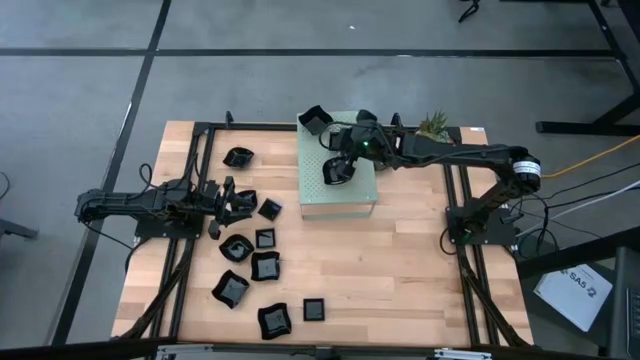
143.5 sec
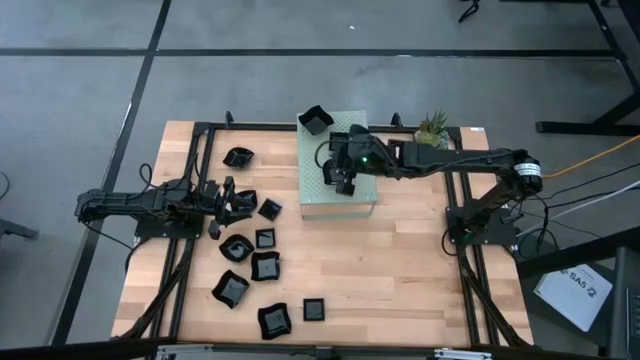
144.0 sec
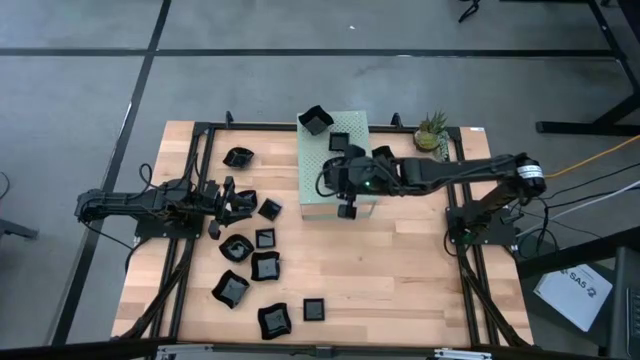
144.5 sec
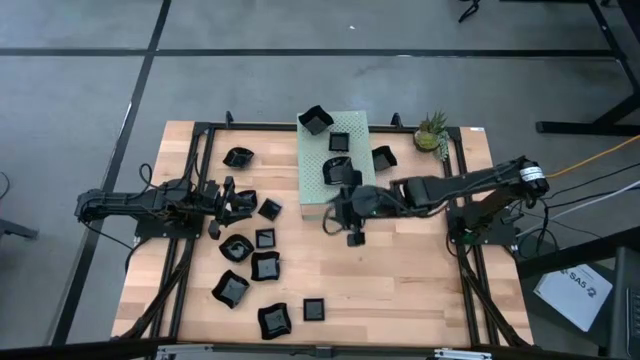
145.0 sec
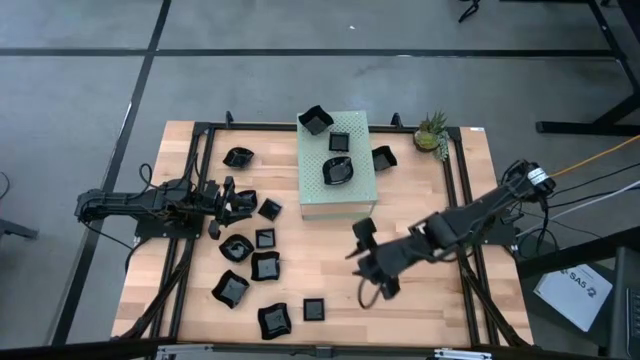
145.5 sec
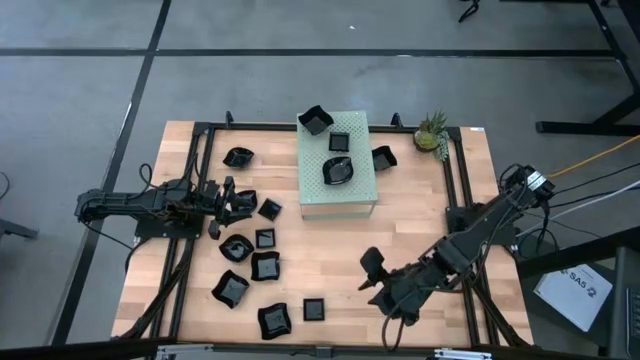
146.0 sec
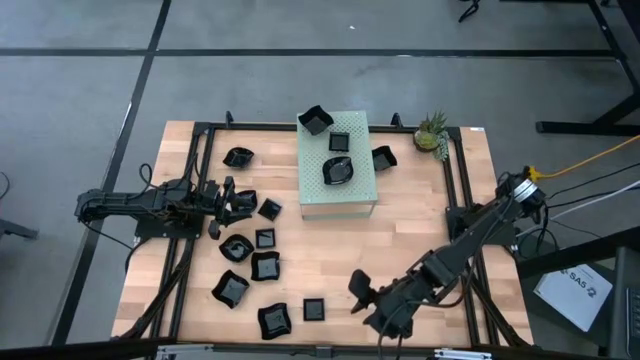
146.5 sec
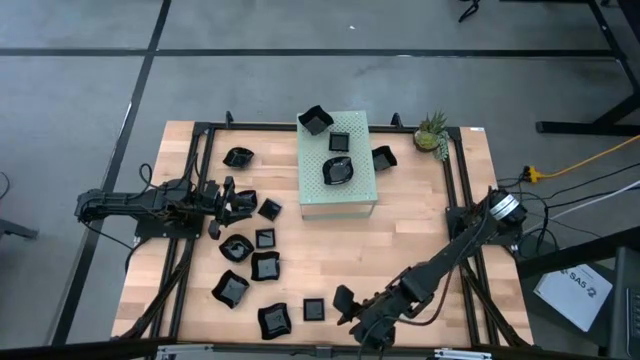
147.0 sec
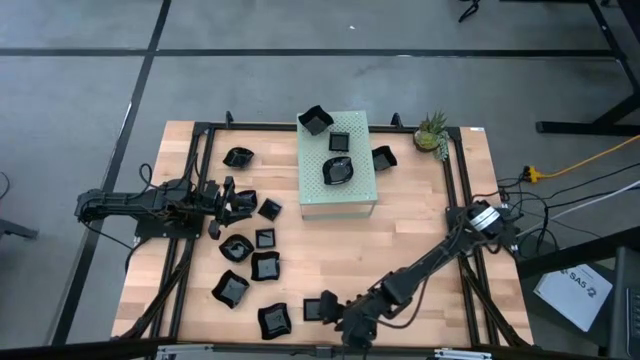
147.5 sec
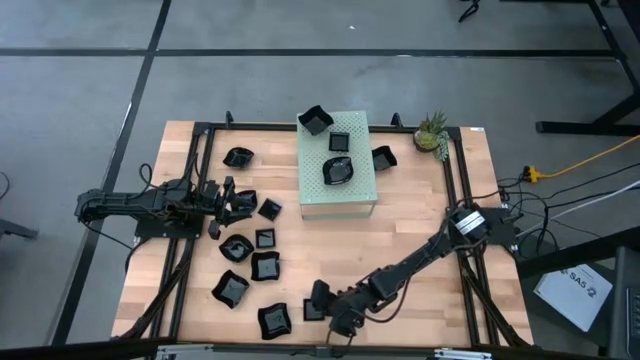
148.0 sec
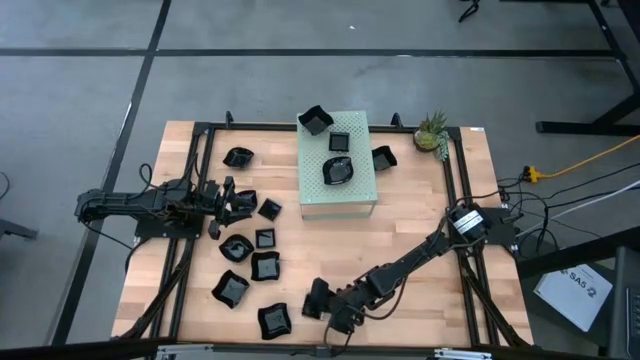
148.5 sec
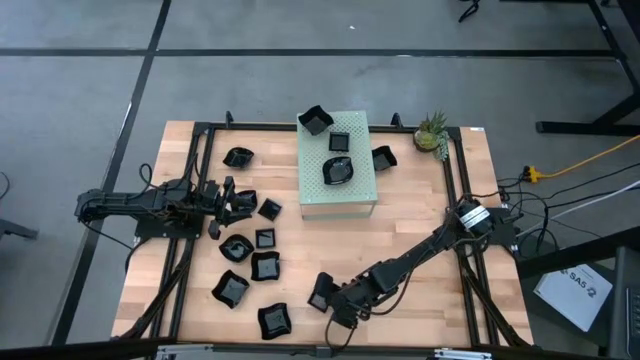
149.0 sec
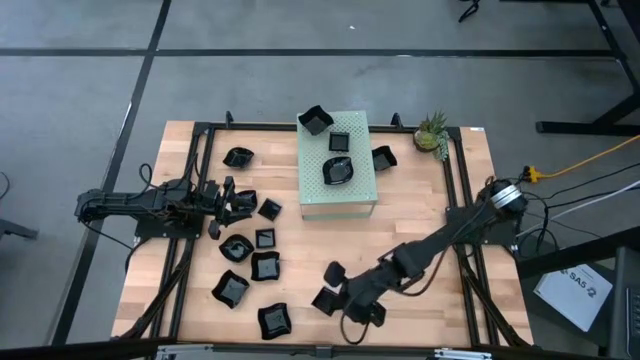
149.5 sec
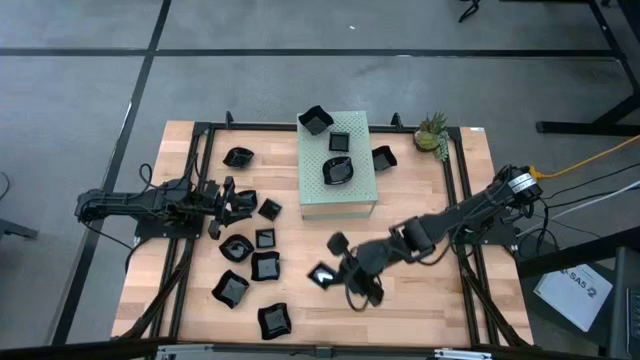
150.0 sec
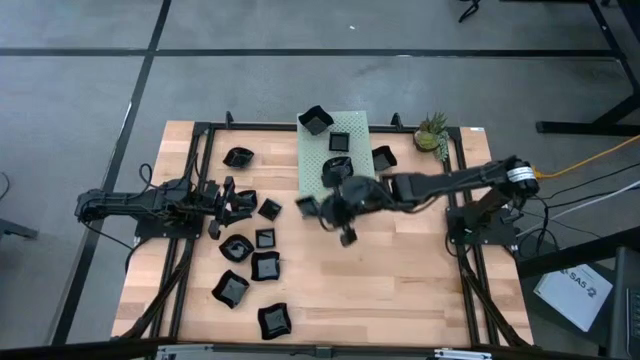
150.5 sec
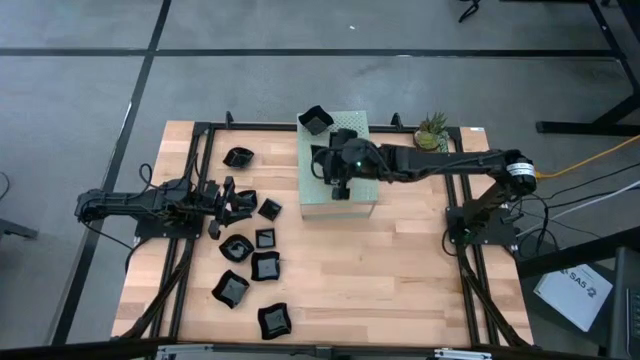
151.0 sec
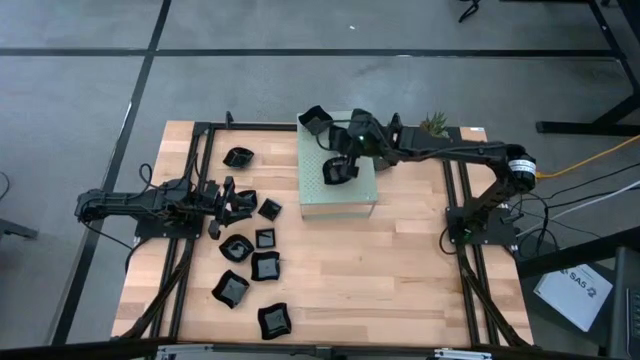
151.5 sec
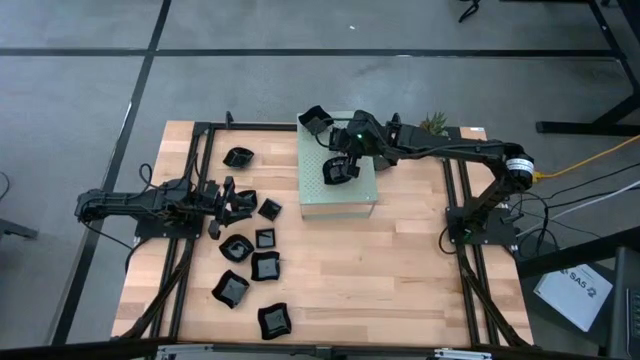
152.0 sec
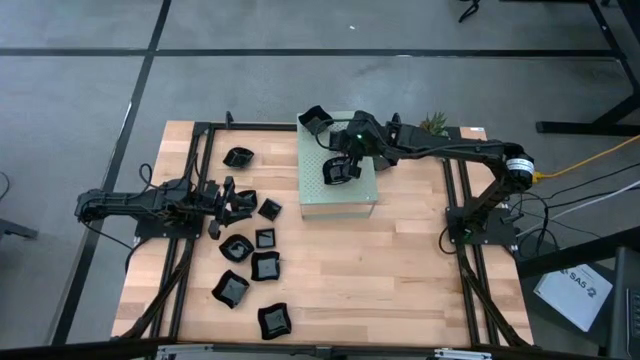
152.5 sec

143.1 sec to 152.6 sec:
Task: Pick & Place Mini shaped plates
Stack the black square plate on top of the black square plates on the shelf

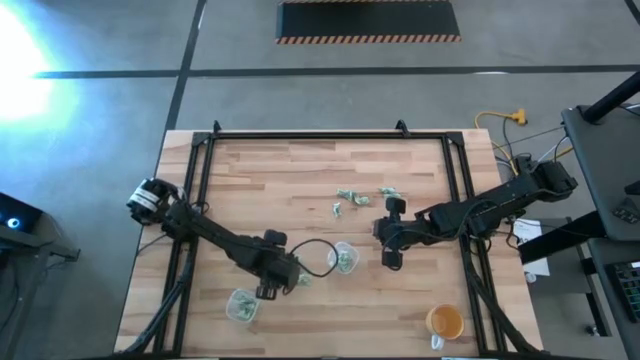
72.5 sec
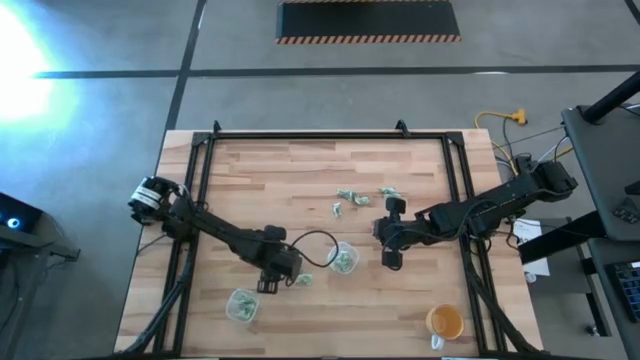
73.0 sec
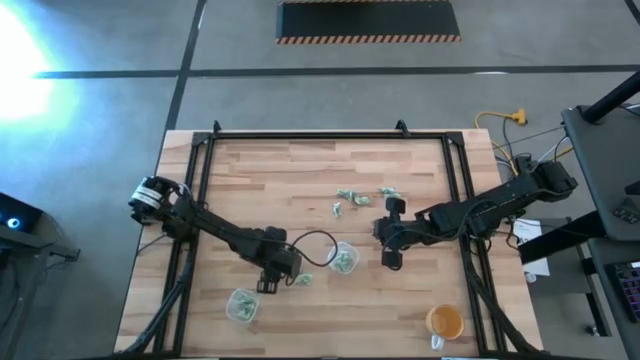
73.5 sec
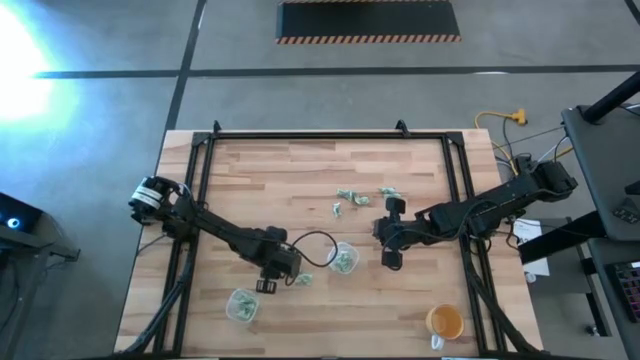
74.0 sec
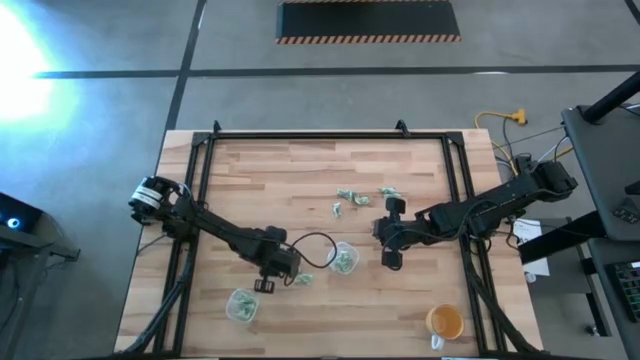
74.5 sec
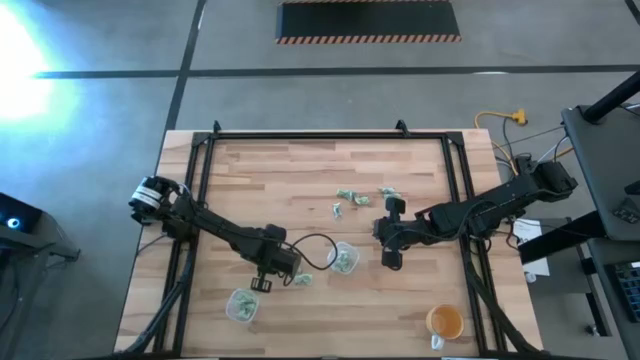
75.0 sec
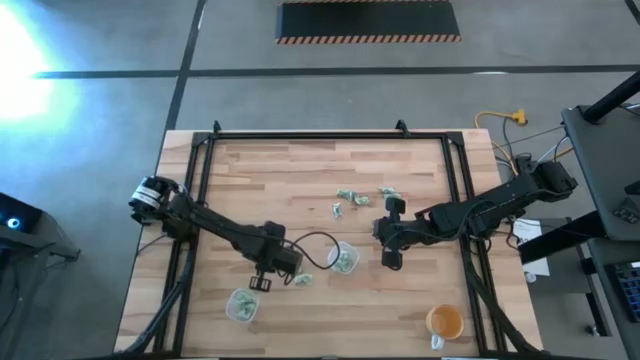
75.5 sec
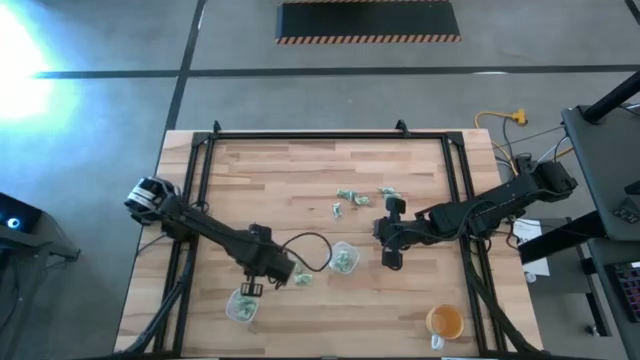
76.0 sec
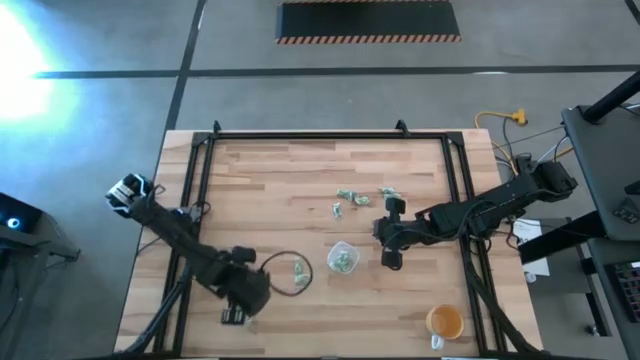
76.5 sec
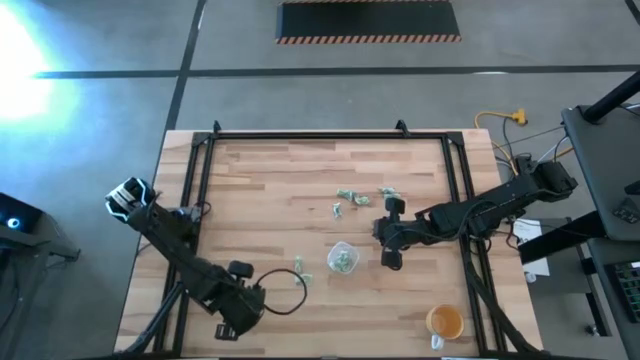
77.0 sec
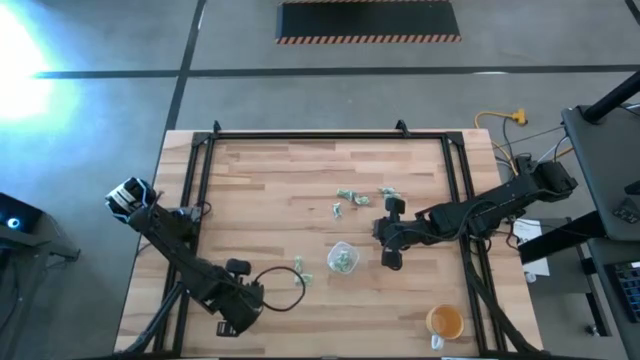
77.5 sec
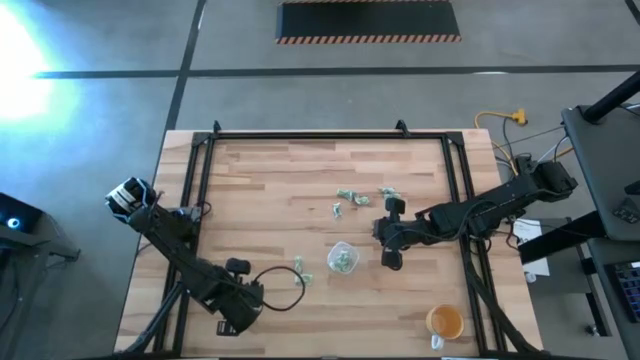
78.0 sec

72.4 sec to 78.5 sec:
Task: Pick and place items into bin
Put the light green packet into the bottom transparent bin

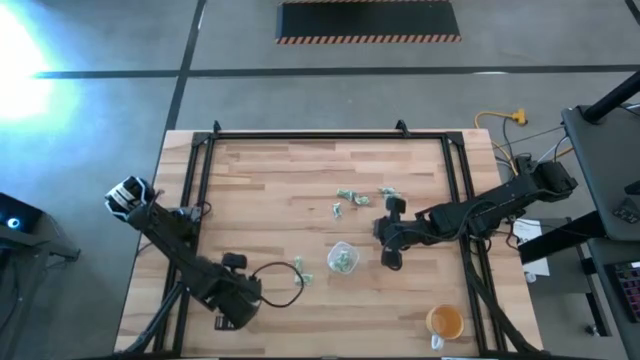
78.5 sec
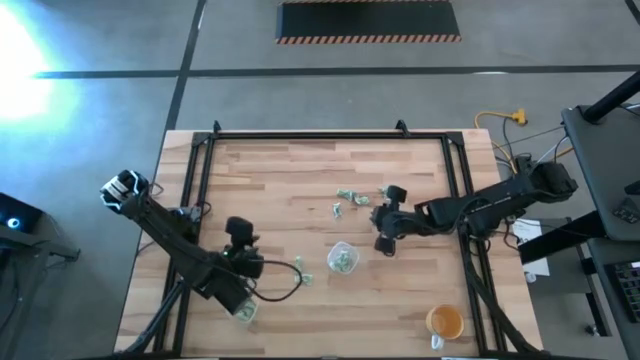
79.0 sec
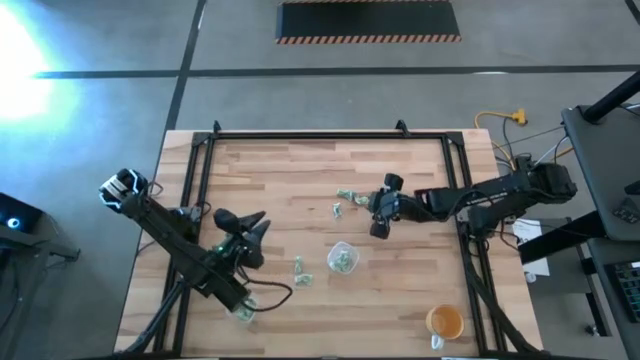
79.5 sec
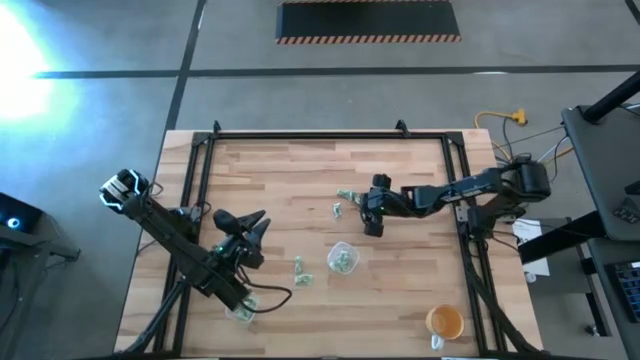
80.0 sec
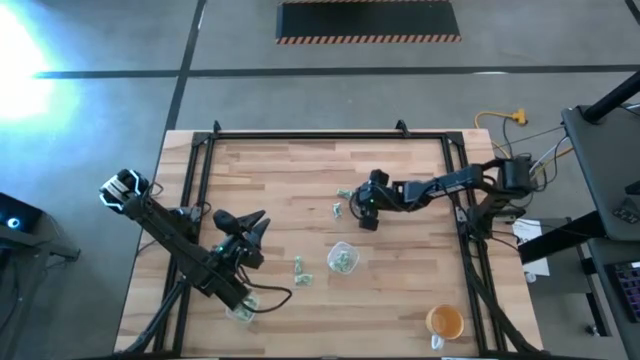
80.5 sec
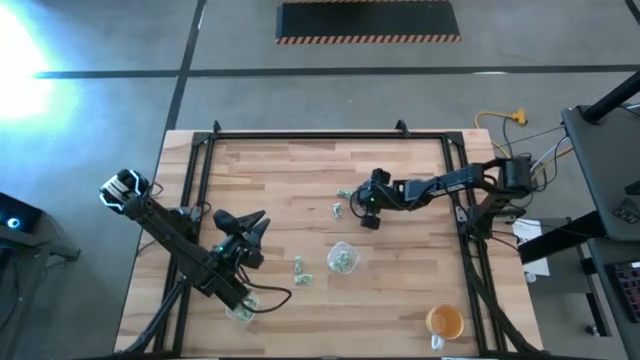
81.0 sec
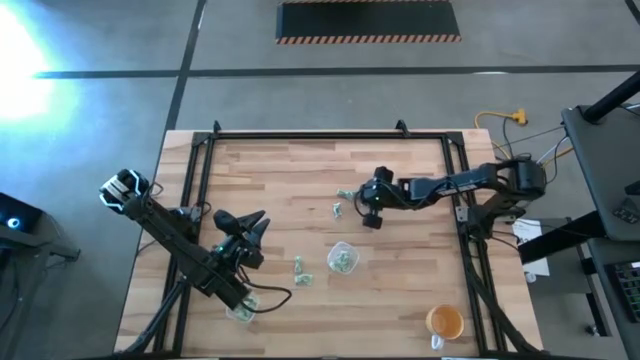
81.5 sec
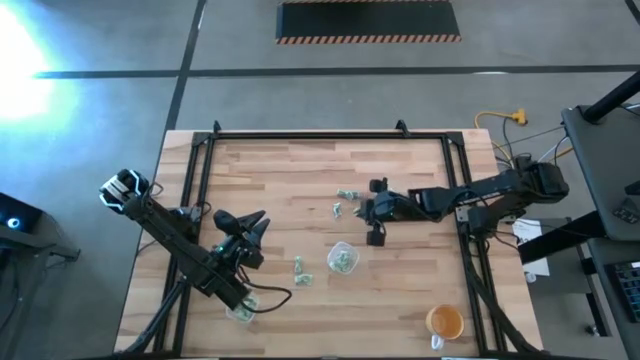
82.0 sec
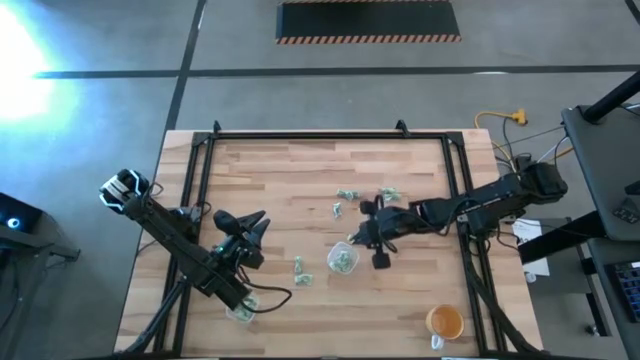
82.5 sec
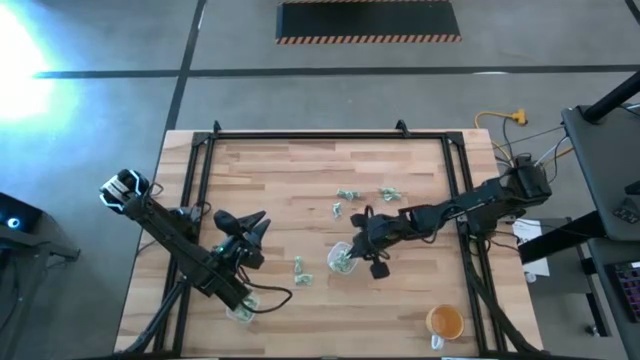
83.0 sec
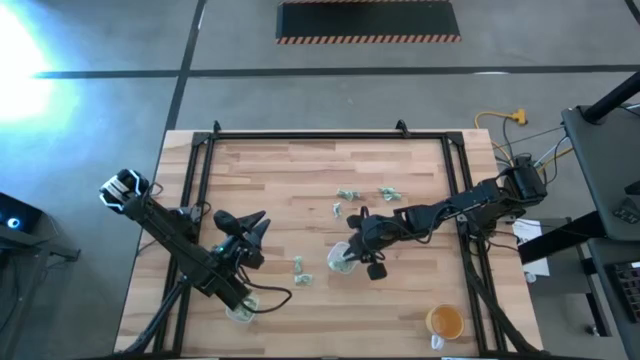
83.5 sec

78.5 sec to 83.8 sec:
Put the light green packet into the top transparent bin
